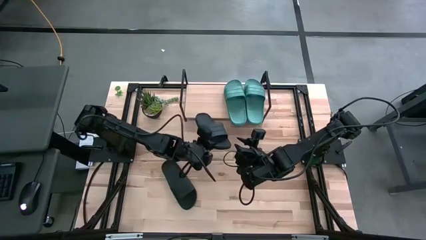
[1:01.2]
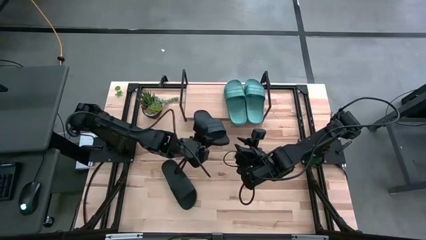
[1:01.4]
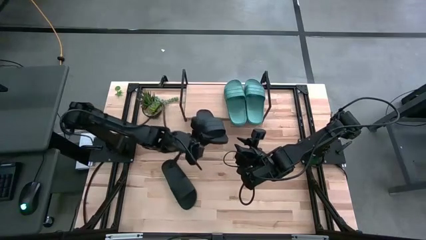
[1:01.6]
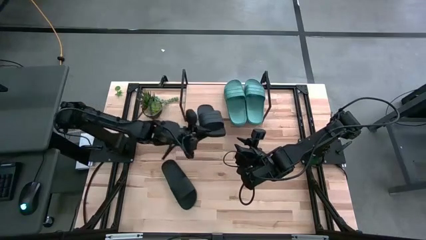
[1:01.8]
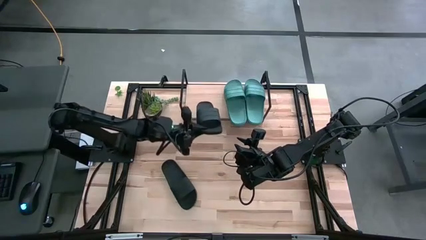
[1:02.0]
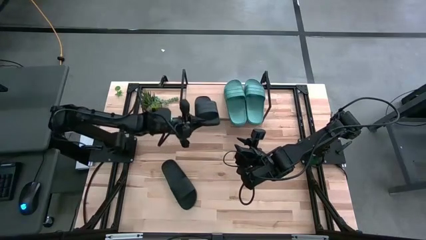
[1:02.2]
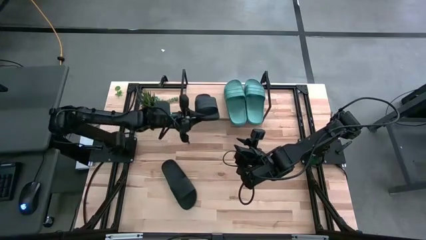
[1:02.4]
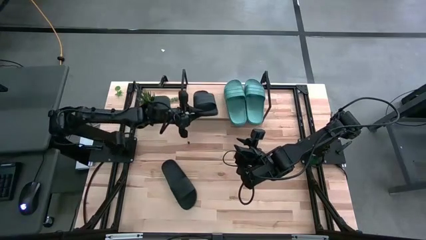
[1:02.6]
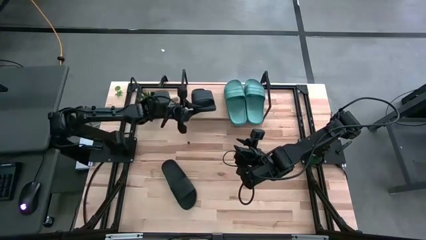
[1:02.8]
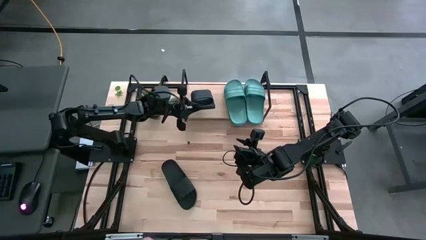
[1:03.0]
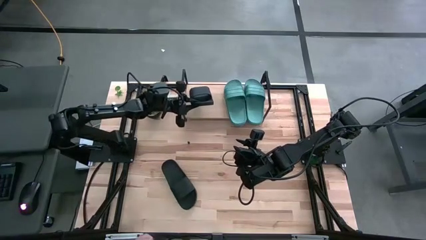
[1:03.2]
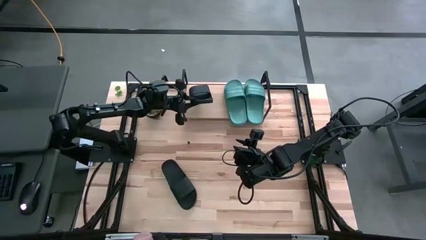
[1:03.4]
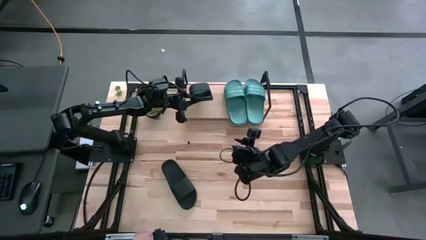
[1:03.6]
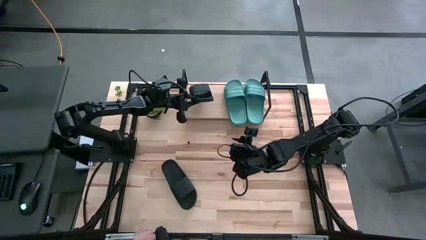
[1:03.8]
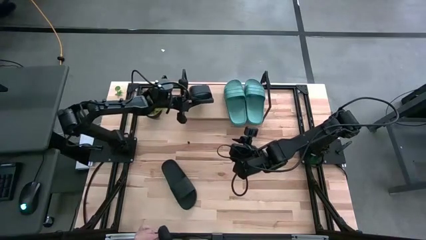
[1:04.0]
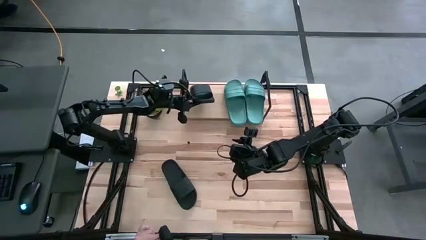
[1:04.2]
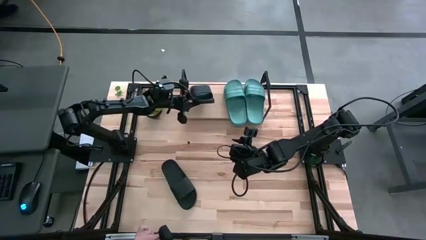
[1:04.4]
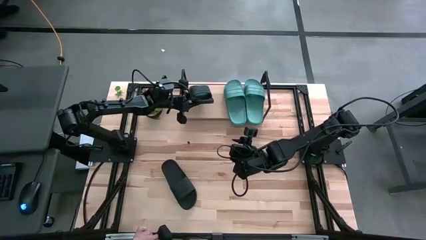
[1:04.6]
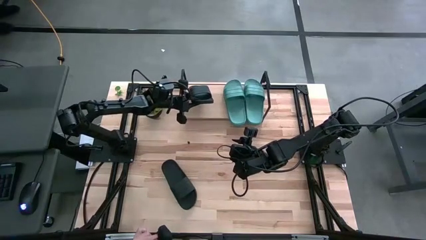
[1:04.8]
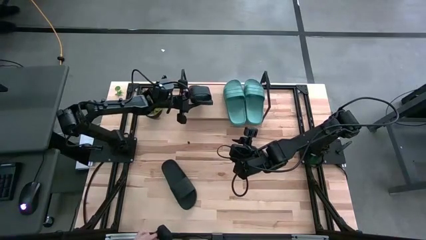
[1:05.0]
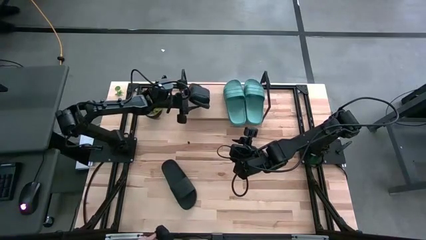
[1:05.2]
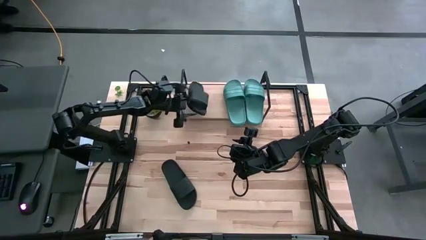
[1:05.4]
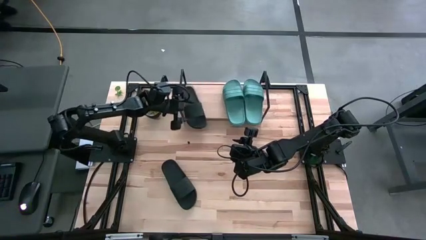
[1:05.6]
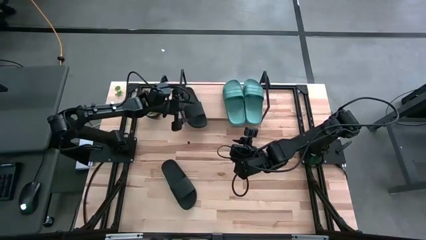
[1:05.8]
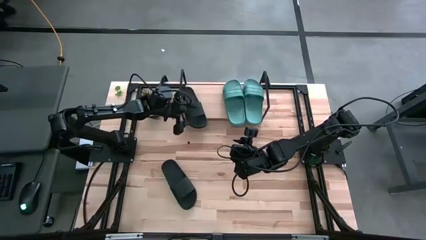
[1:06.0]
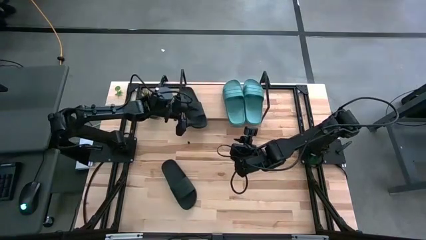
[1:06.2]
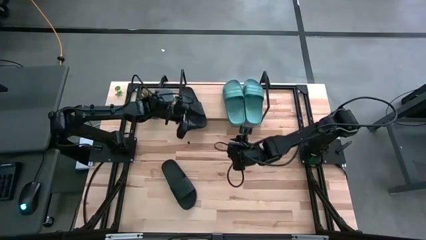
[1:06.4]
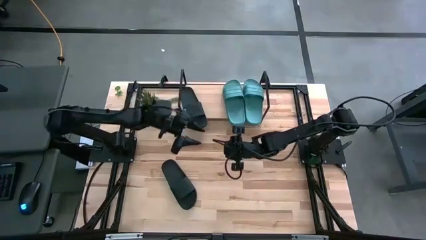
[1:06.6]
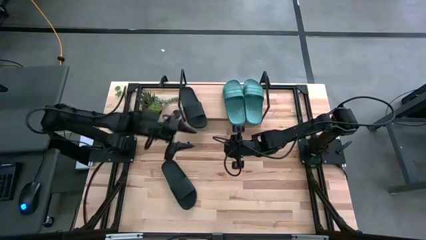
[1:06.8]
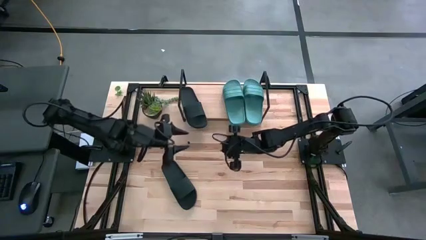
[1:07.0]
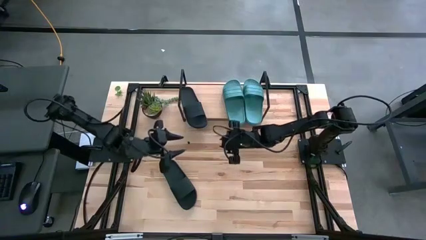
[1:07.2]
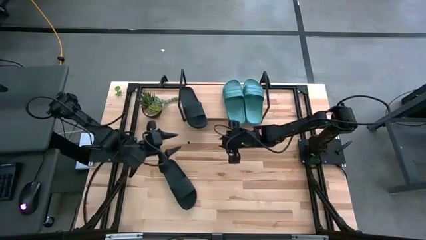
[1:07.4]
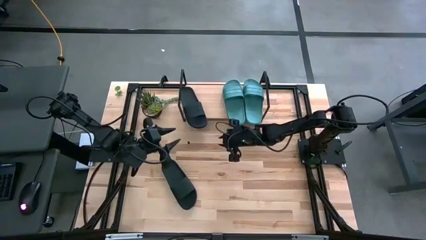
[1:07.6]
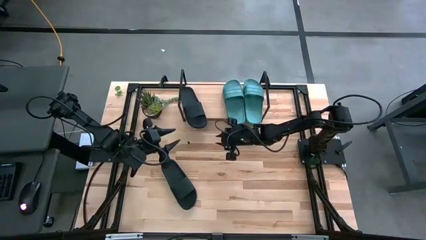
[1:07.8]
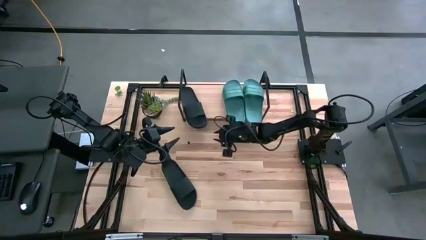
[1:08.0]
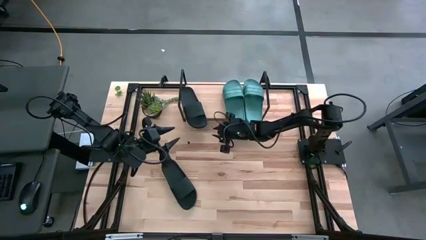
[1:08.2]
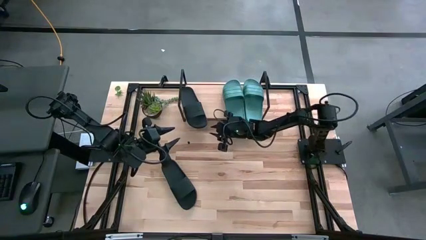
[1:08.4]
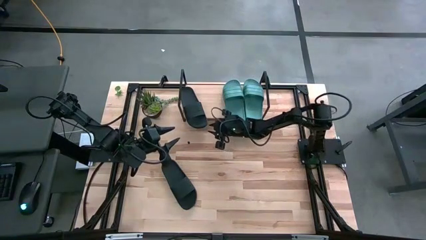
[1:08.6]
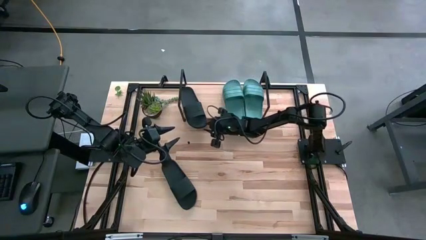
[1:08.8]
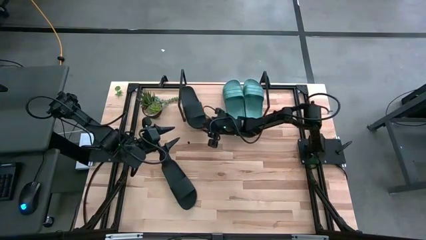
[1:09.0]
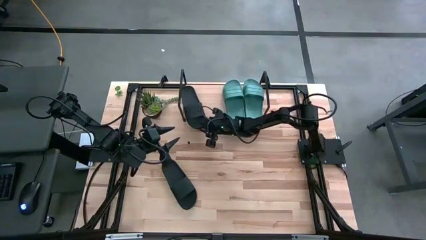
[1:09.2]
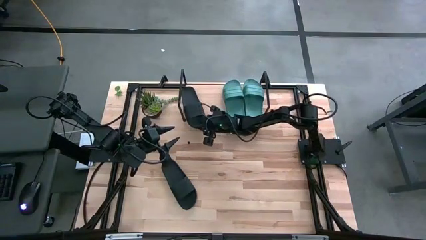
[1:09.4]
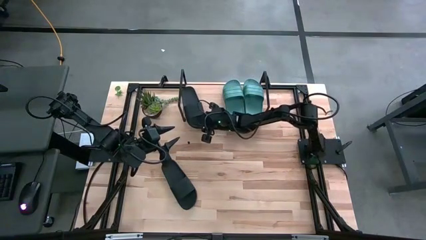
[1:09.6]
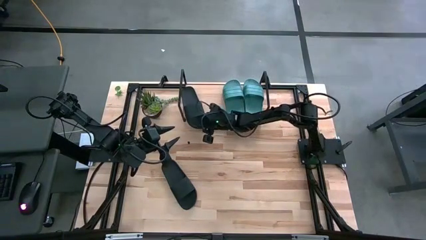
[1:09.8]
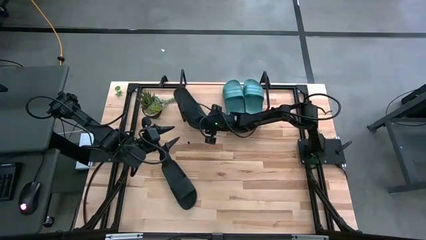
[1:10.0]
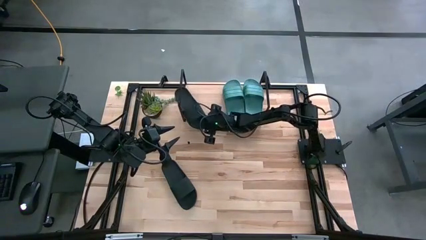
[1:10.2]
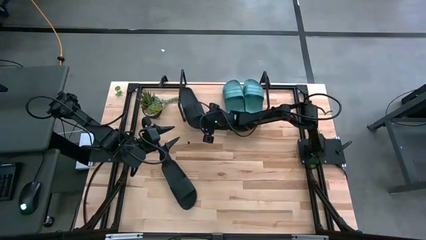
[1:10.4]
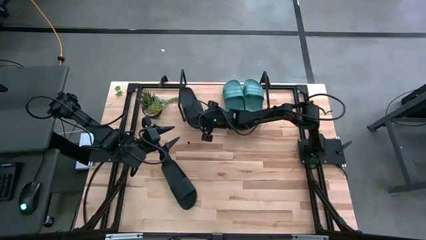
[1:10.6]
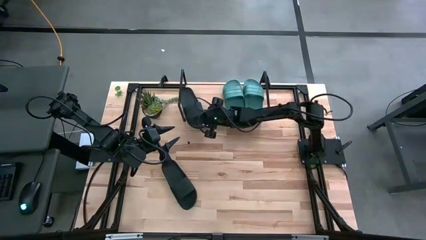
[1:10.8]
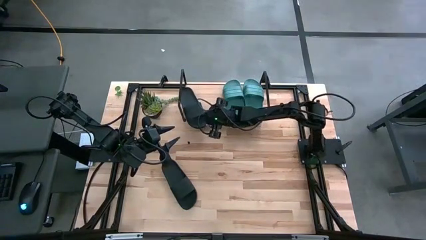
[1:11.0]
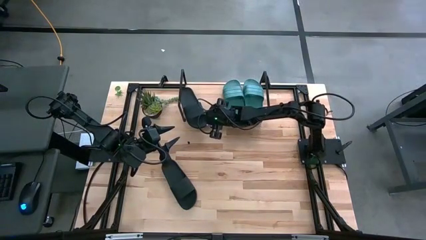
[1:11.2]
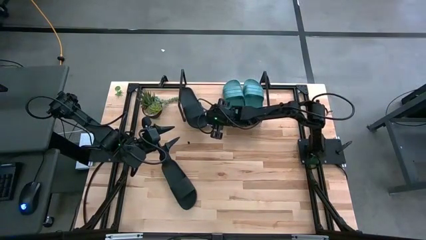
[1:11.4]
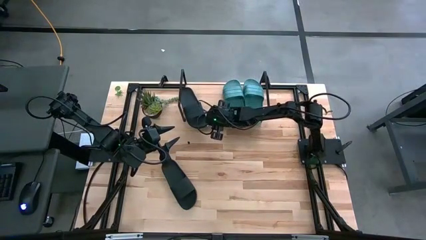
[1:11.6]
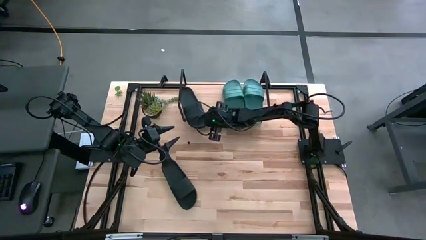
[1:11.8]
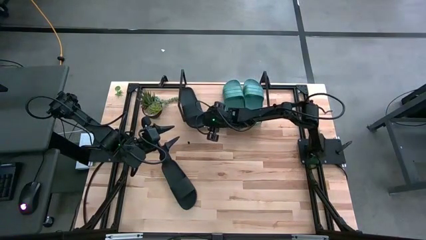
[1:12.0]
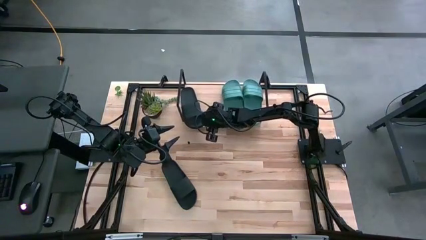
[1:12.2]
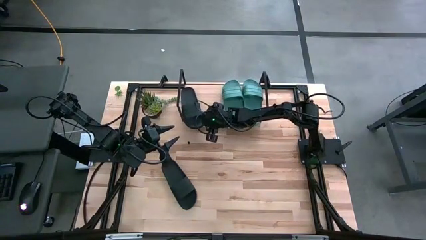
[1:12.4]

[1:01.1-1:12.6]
Task: Pick and place slides into the shelf
Put the right black slide on the shelf

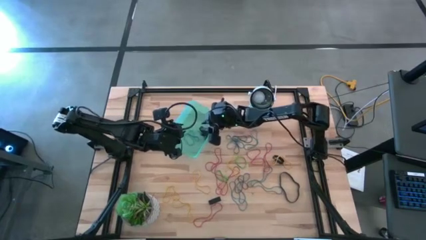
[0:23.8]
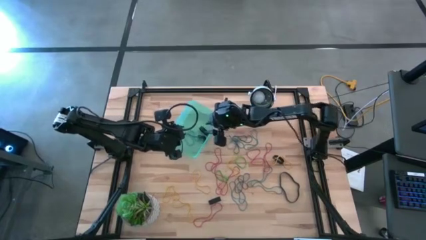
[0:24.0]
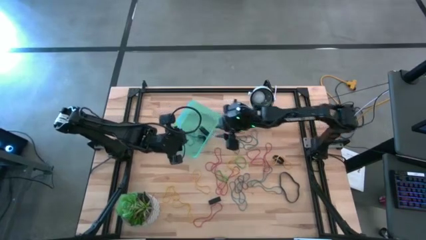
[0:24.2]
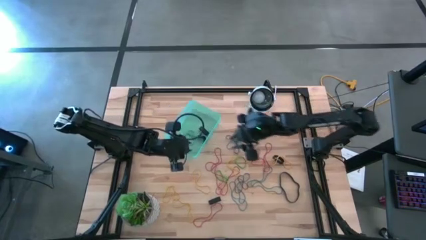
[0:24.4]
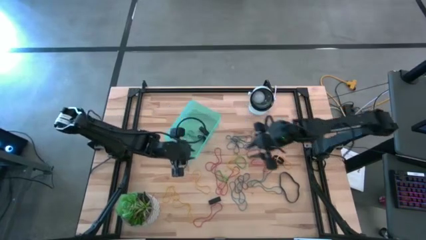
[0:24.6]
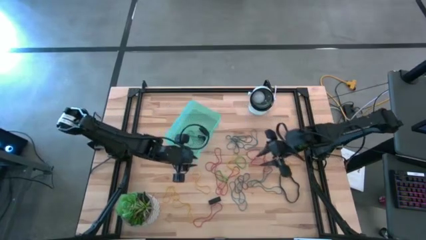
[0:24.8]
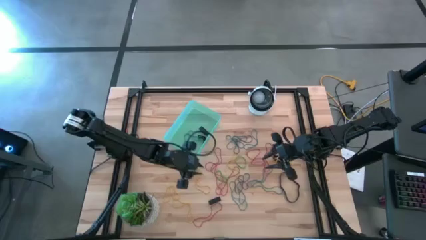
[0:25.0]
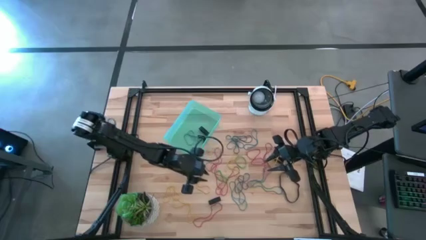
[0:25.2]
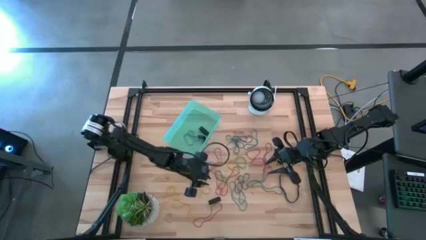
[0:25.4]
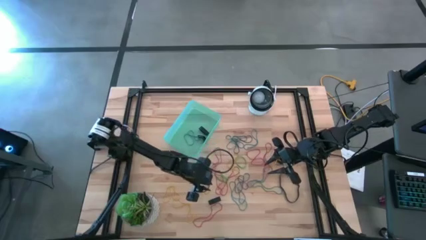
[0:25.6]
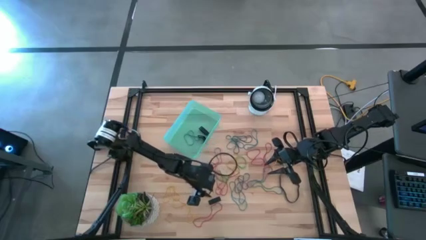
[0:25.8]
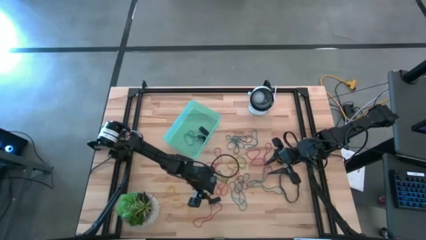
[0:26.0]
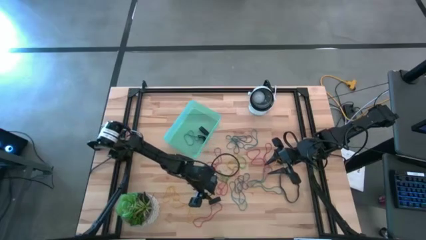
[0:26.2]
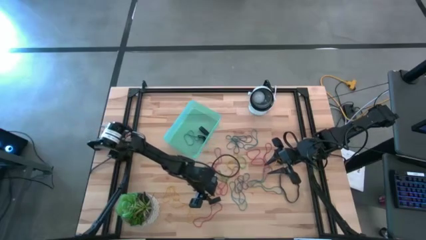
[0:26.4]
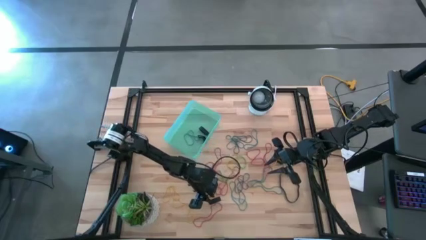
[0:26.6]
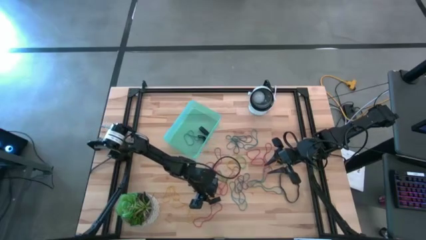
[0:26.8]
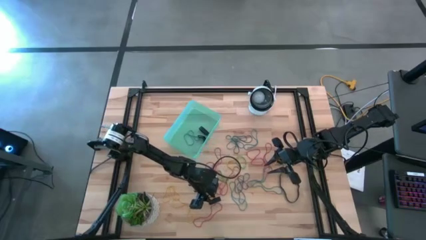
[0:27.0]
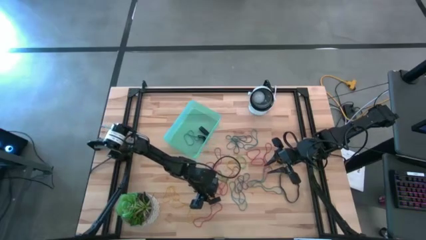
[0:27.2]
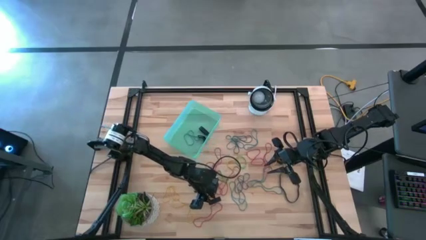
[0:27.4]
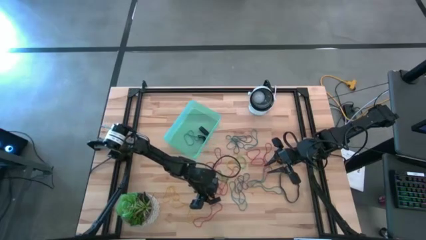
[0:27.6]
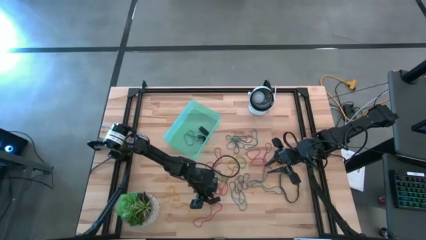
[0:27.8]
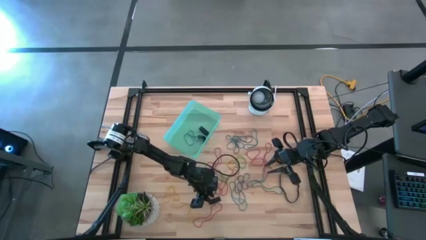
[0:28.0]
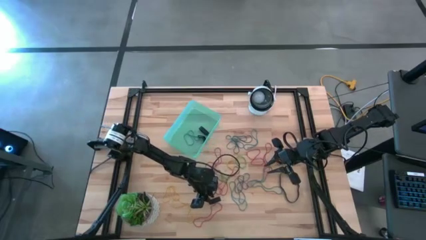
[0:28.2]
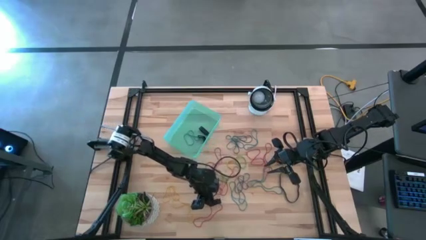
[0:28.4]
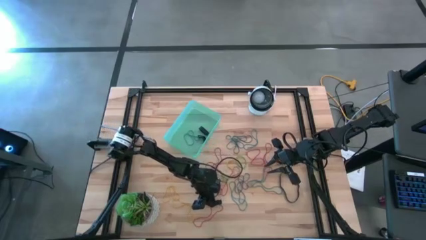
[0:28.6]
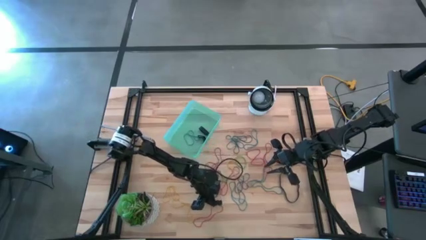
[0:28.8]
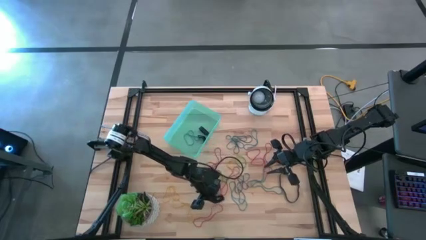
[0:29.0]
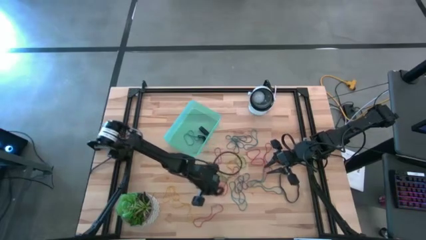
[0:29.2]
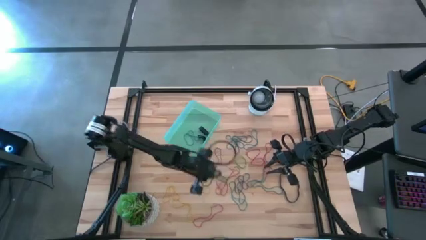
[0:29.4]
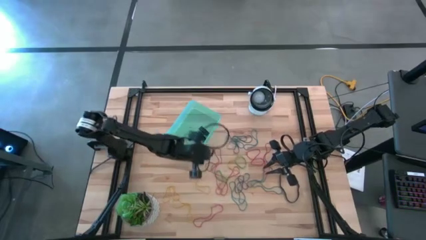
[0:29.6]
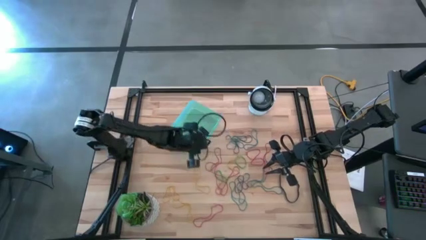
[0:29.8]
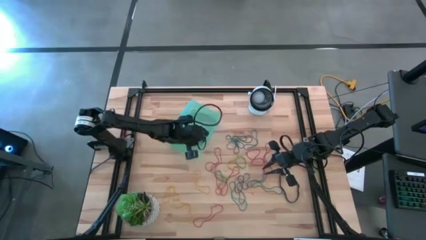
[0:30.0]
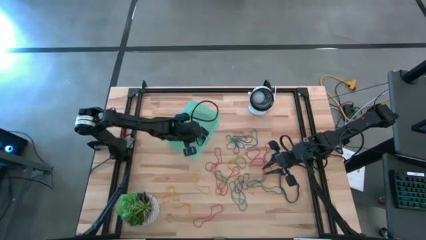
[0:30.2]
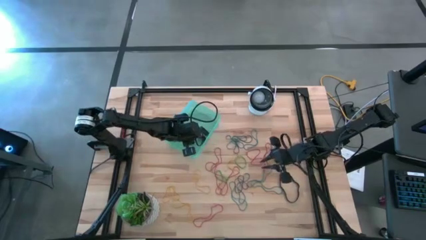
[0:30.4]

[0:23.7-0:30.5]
Task: Pick and place rubber bands into bin
Put the black rubber band into the green bin
